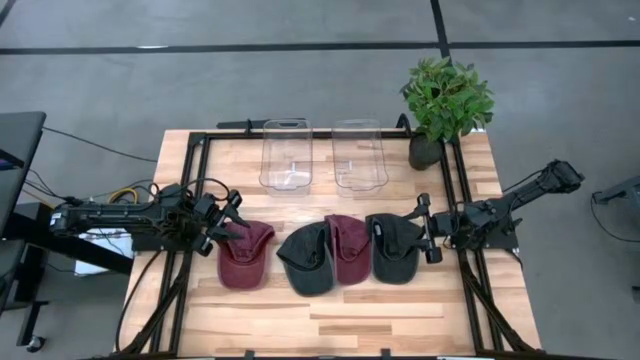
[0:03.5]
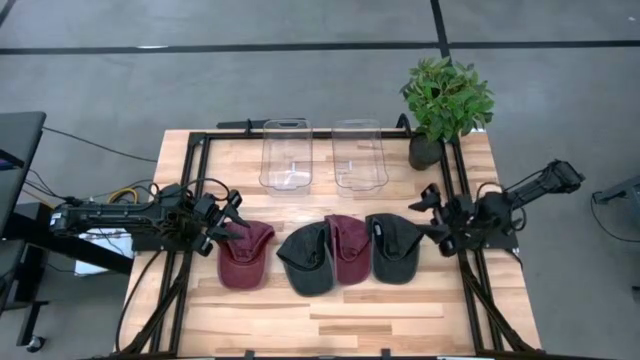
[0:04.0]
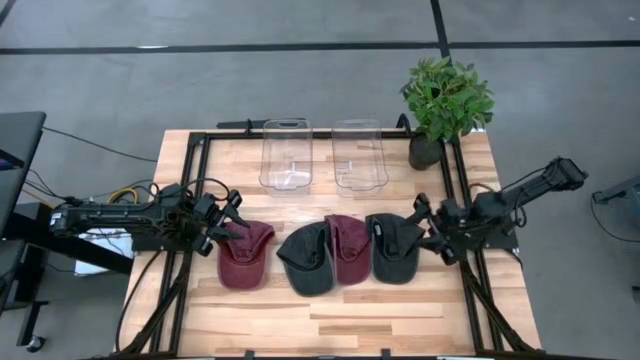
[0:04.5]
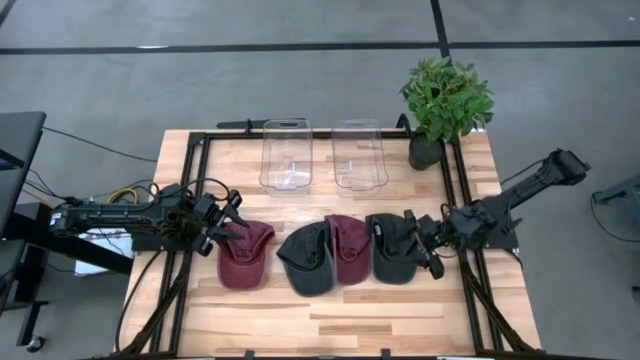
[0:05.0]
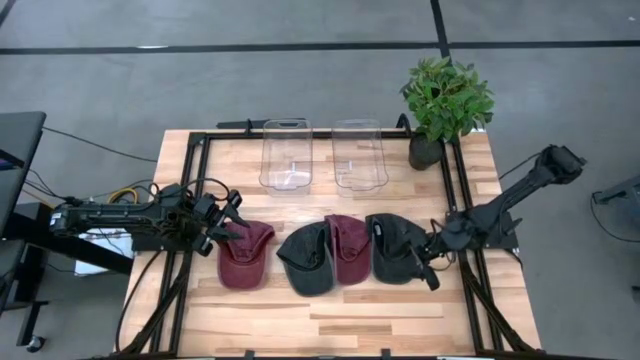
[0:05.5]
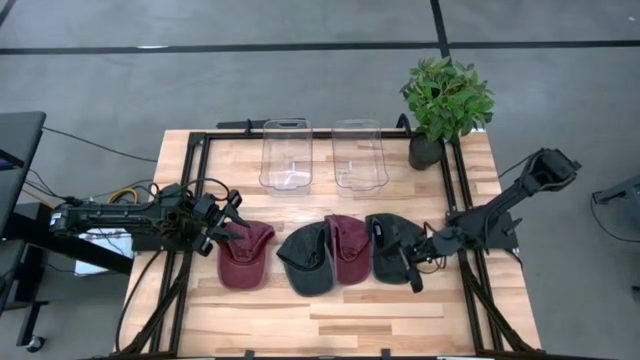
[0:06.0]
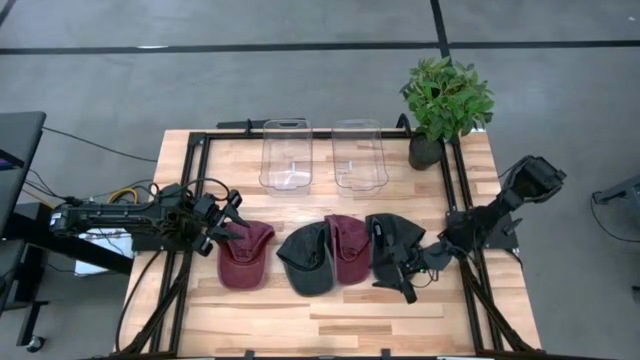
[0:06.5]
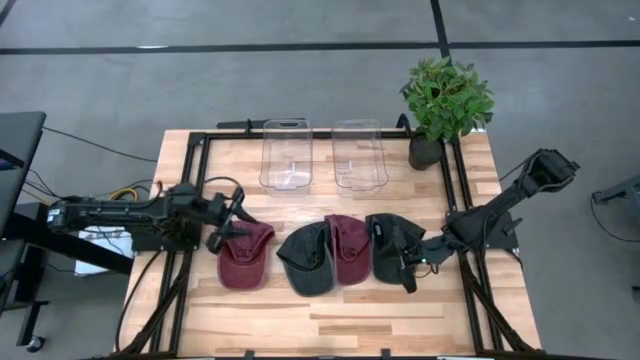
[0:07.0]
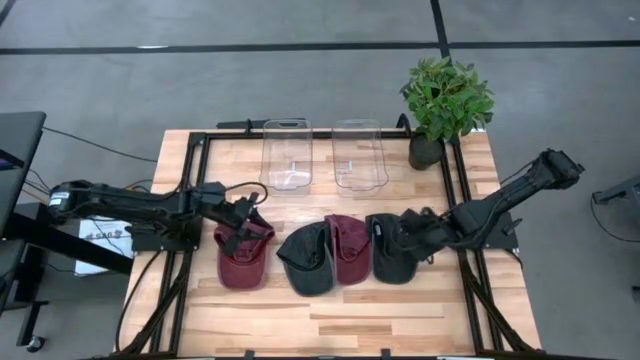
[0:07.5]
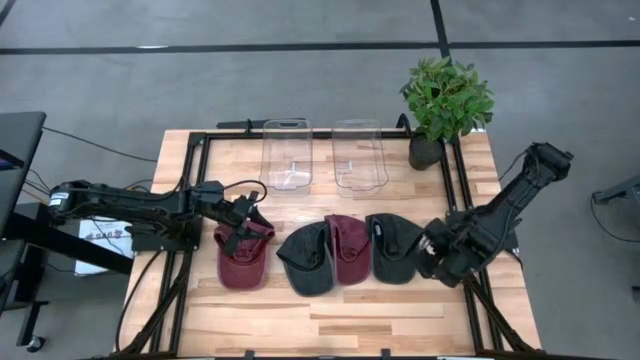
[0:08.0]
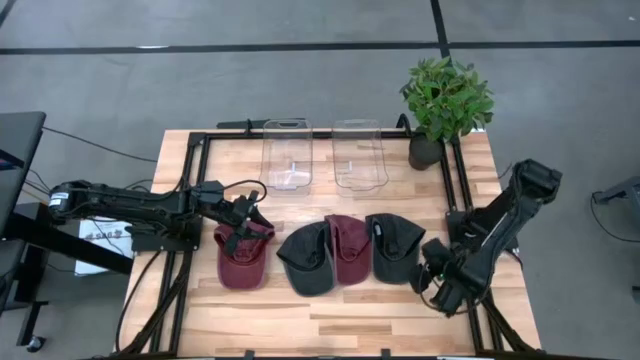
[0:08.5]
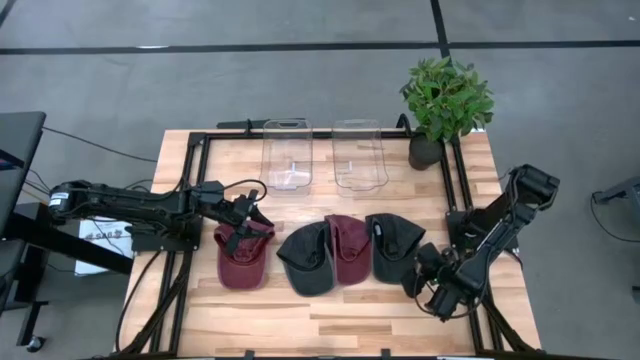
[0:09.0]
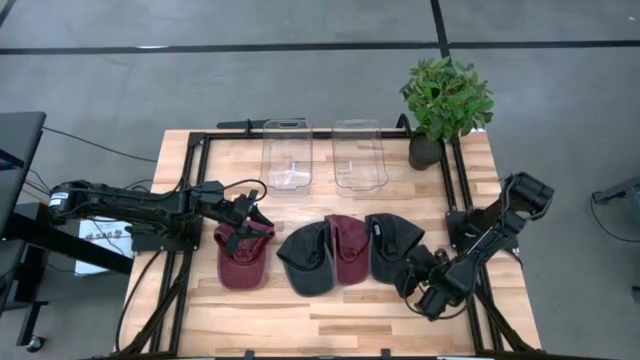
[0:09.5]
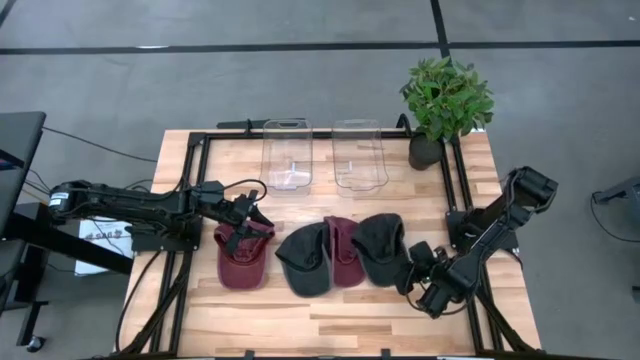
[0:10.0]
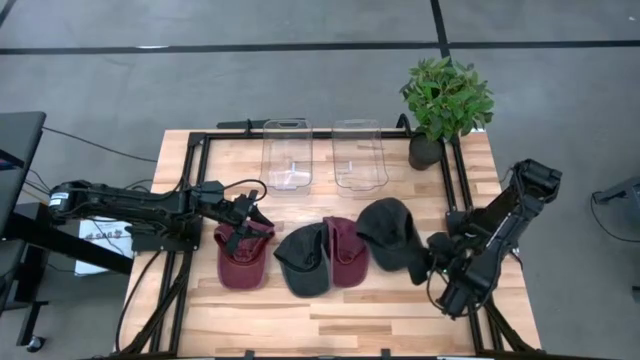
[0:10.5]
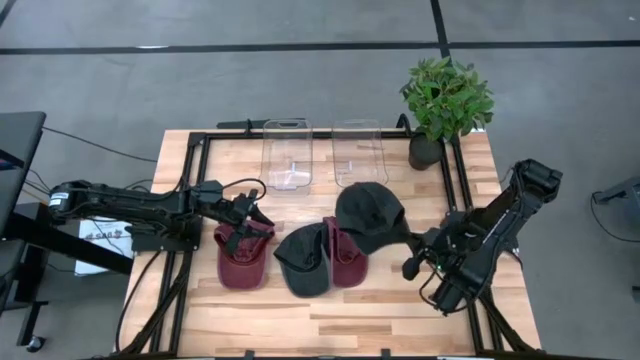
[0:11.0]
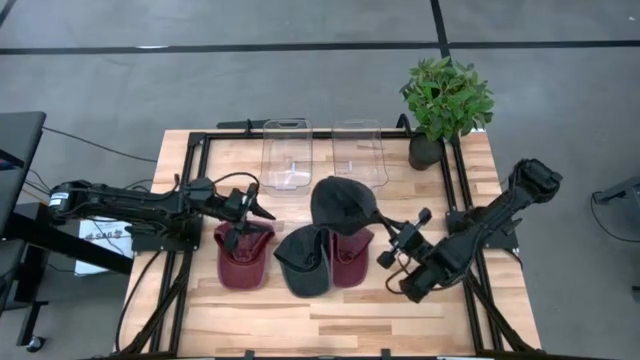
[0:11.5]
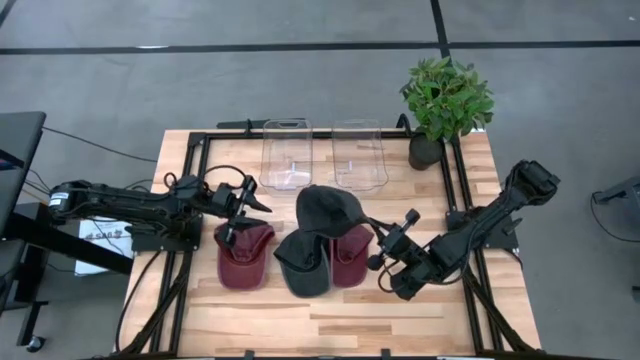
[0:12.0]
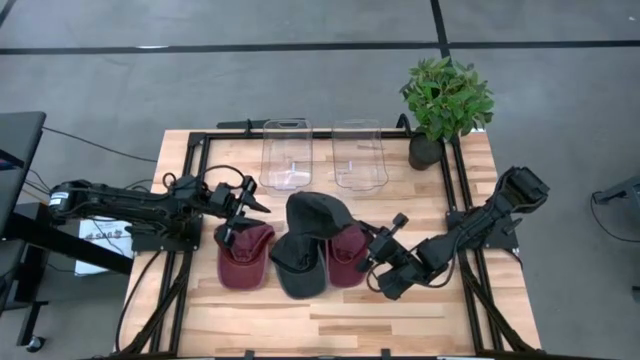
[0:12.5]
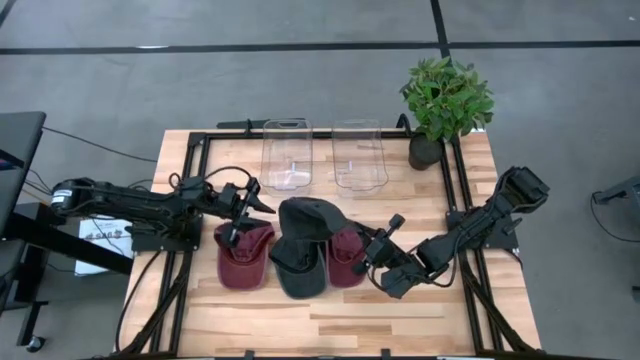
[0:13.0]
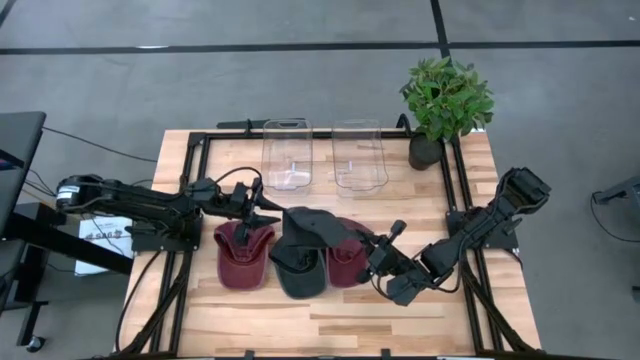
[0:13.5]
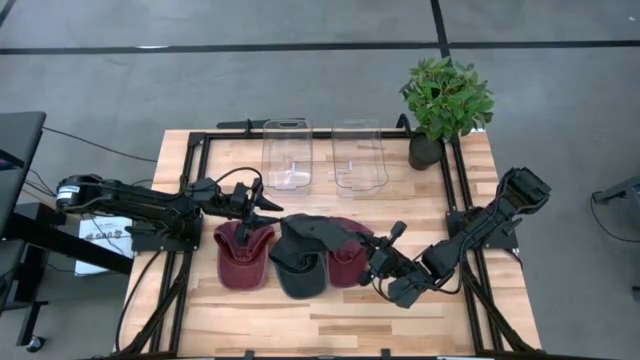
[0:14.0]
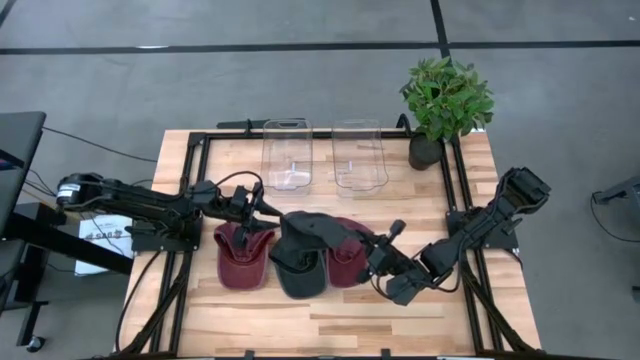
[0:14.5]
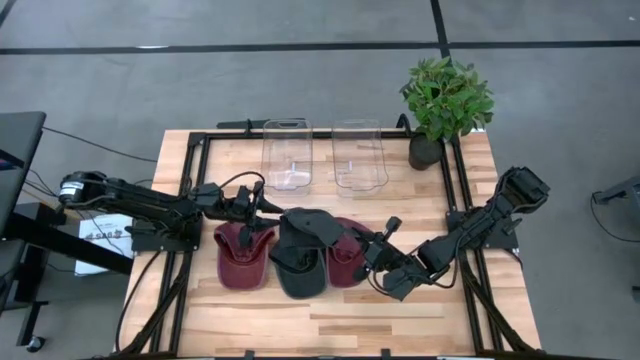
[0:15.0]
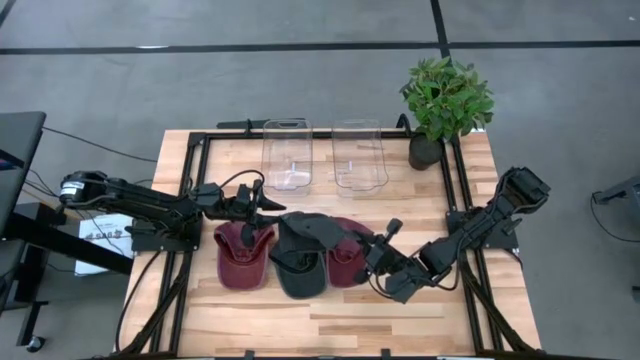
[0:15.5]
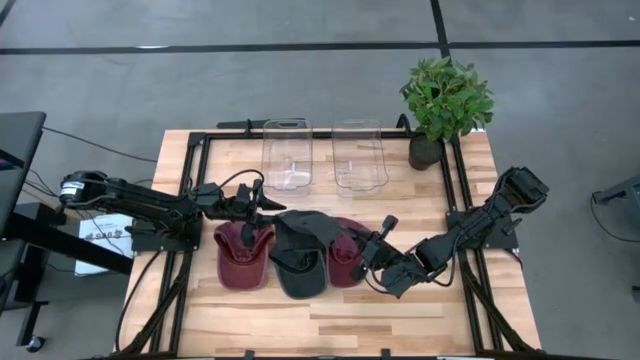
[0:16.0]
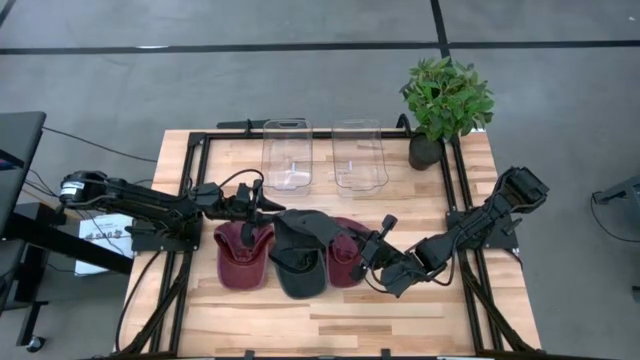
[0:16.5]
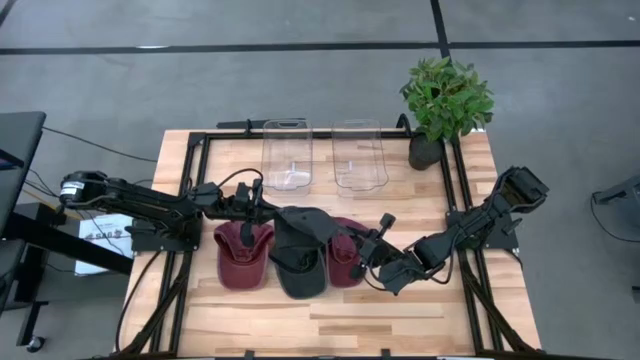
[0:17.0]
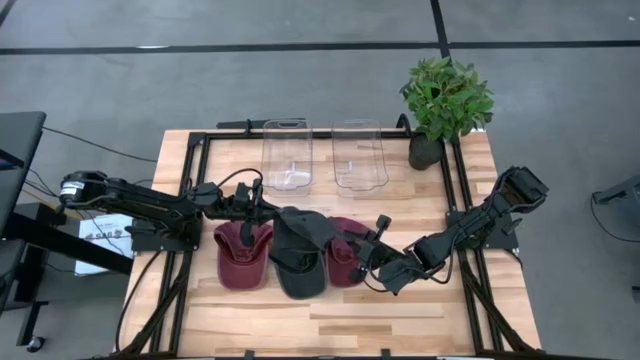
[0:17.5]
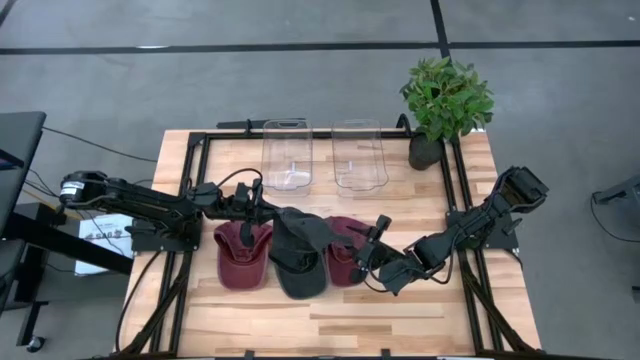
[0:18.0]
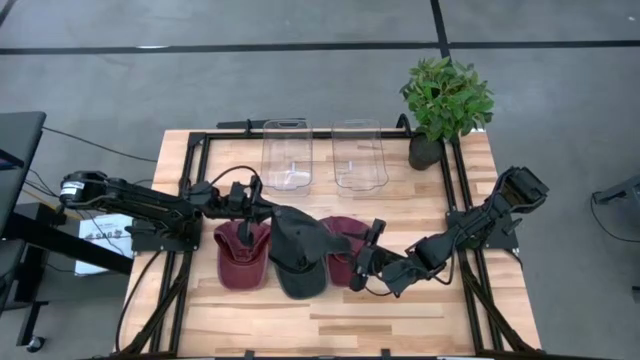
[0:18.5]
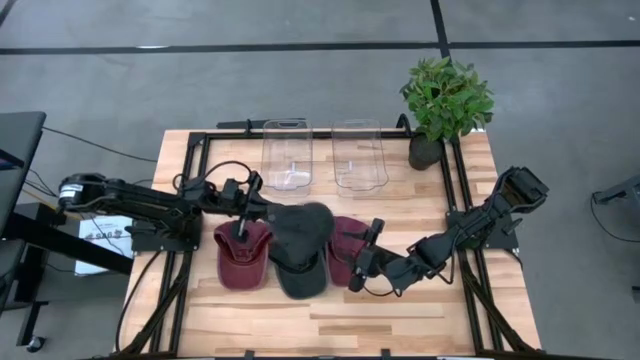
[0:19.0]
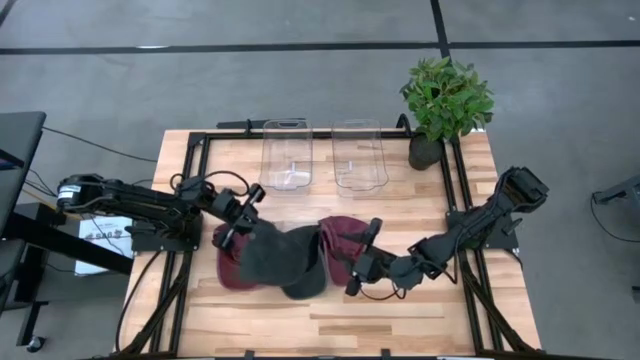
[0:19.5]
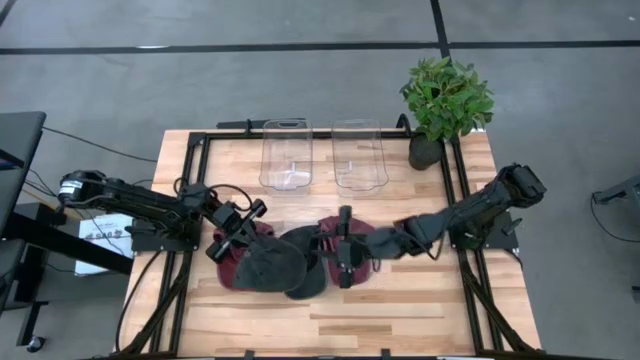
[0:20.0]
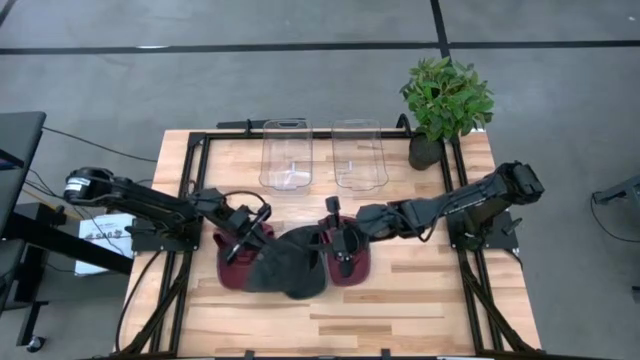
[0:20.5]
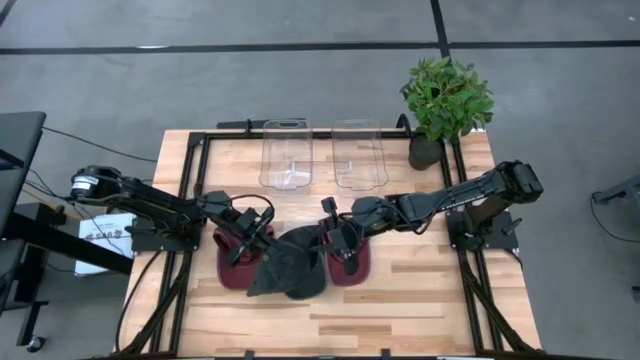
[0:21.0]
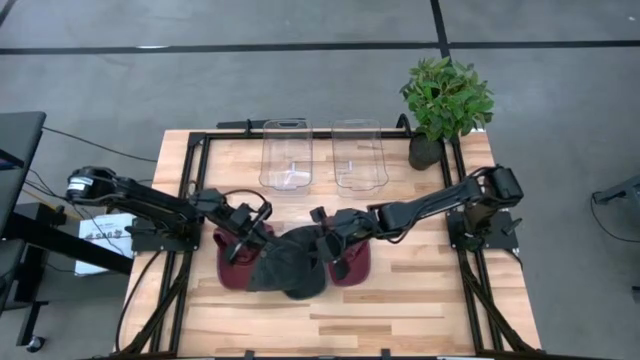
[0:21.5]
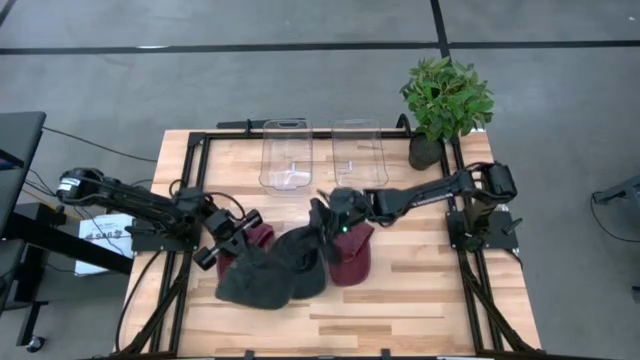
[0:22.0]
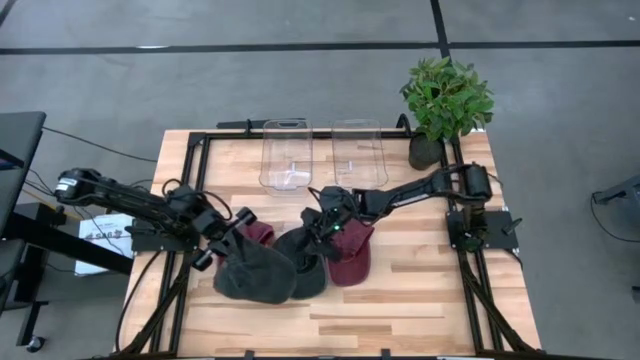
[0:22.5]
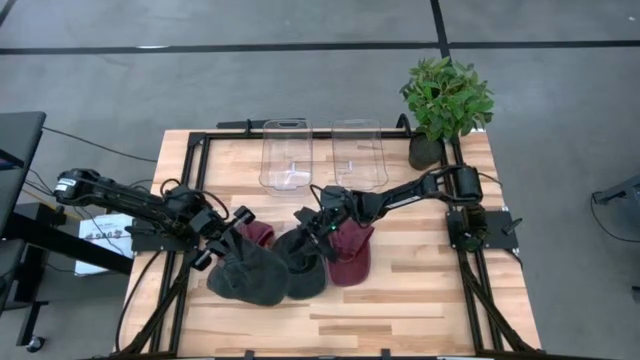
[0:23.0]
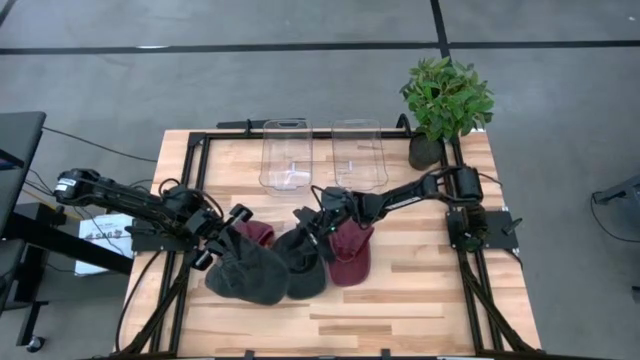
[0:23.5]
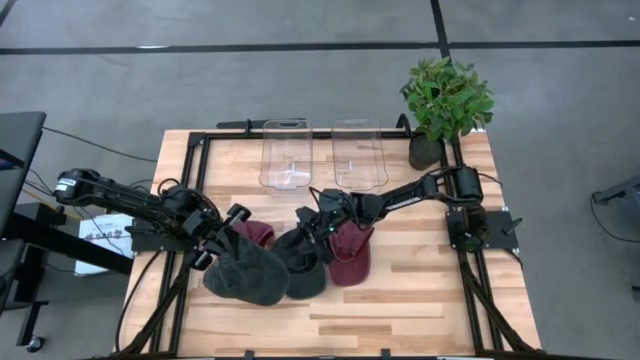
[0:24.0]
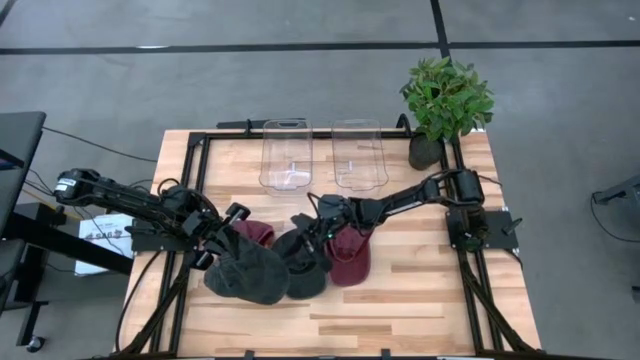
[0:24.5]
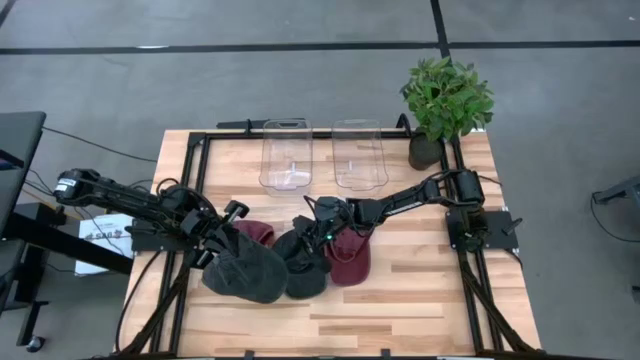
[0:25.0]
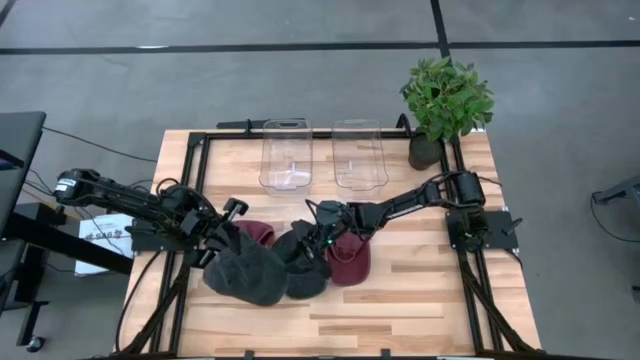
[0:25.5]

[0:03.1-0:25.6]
Task: Pick & Place hat
Put the right black cap into the left transparent bin
